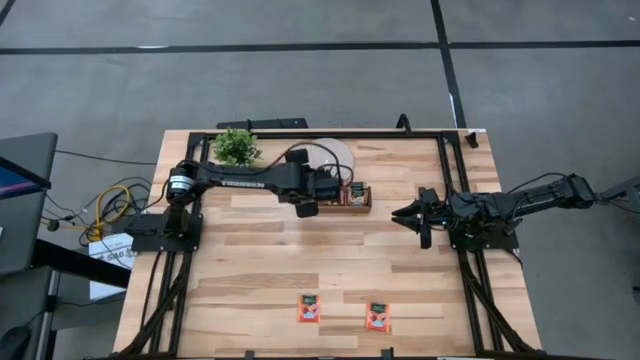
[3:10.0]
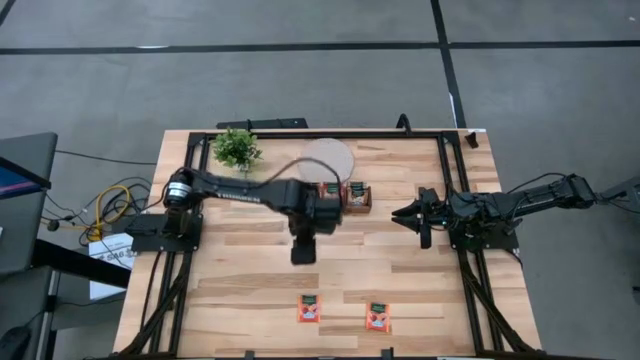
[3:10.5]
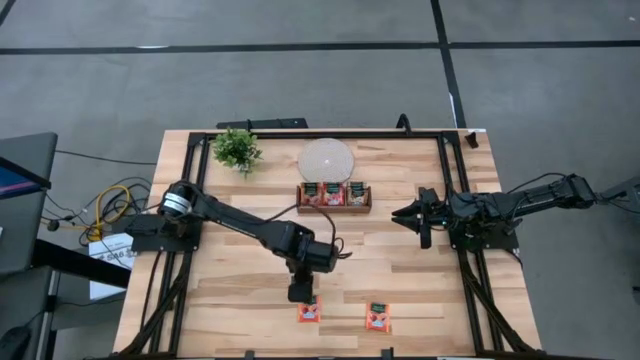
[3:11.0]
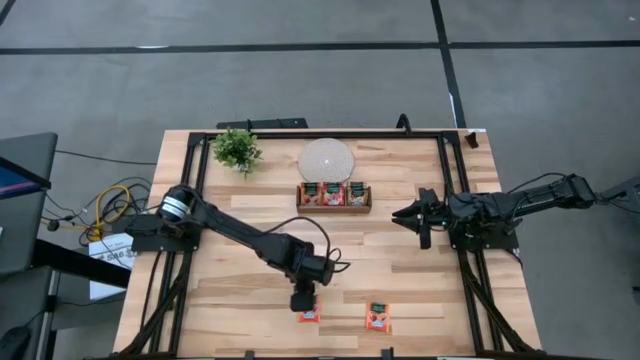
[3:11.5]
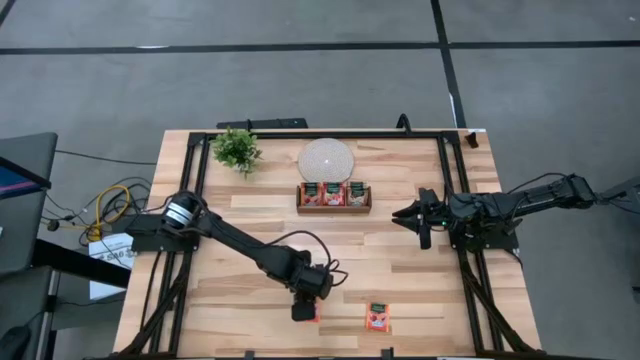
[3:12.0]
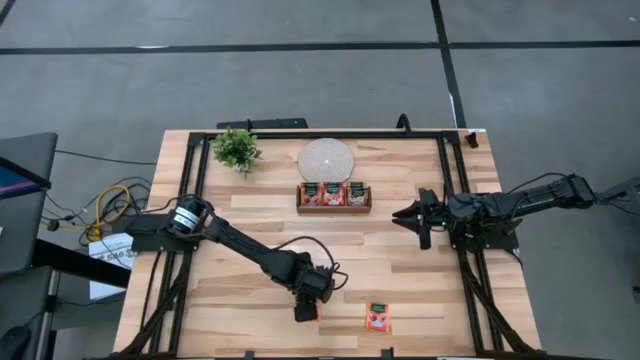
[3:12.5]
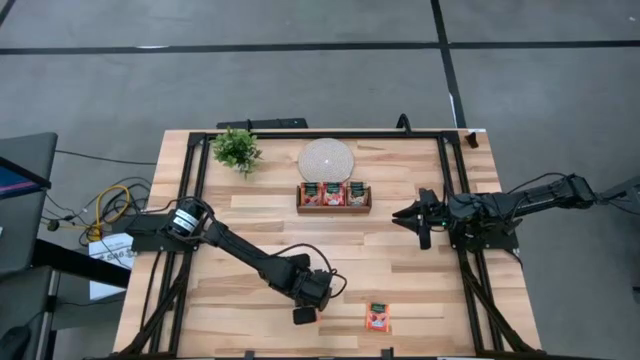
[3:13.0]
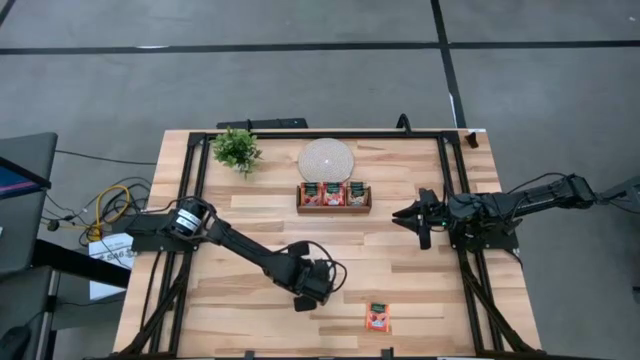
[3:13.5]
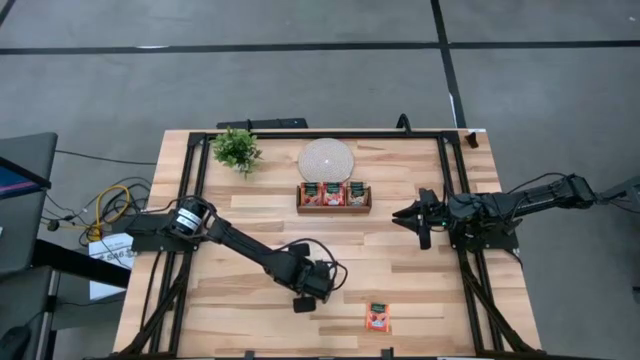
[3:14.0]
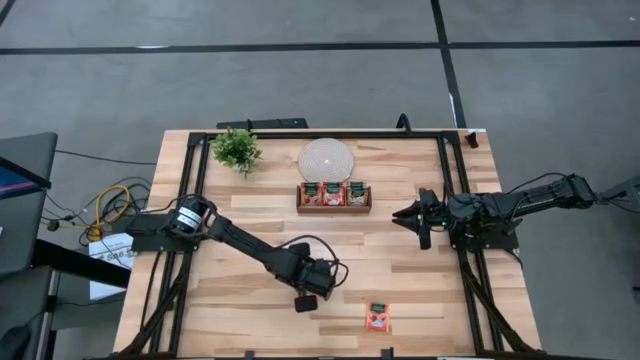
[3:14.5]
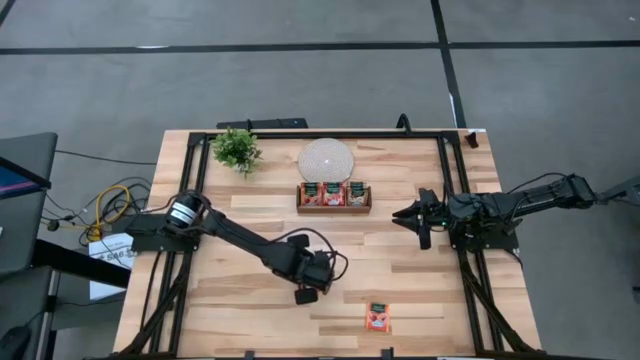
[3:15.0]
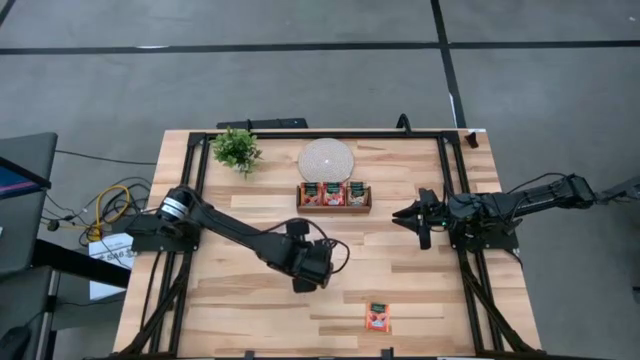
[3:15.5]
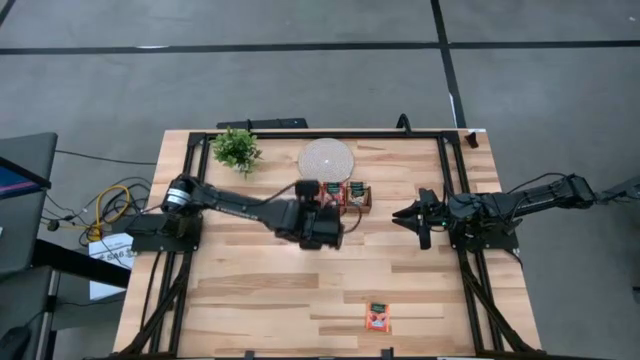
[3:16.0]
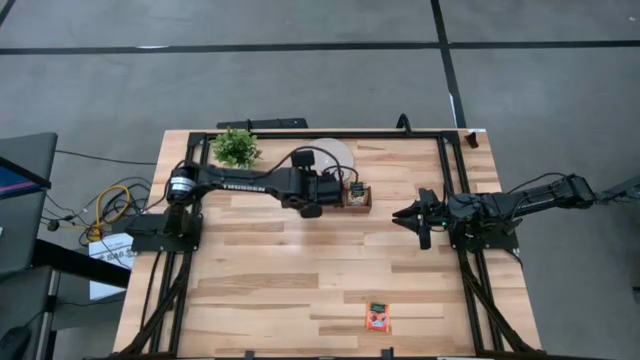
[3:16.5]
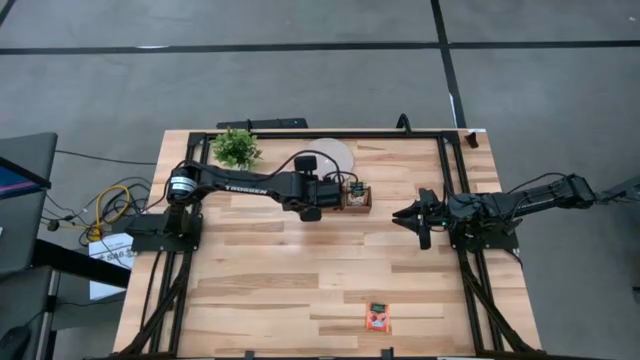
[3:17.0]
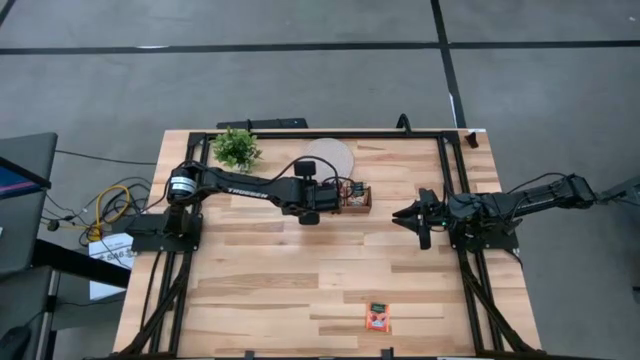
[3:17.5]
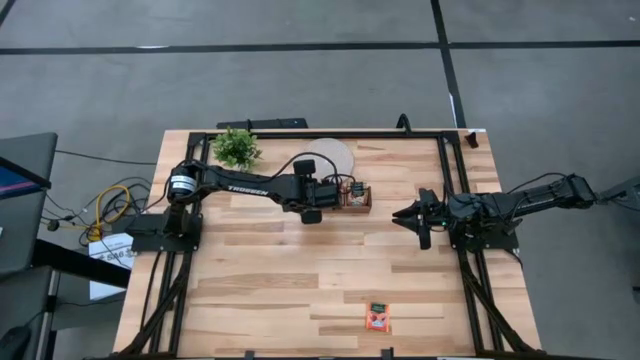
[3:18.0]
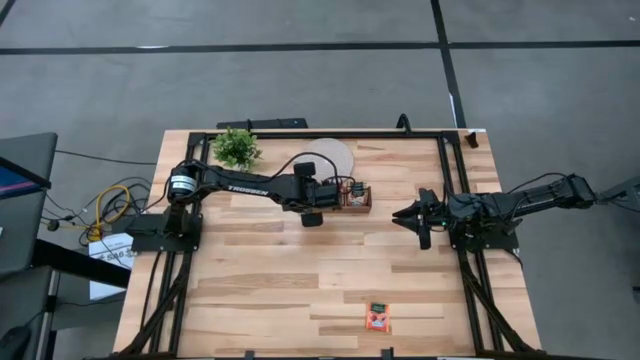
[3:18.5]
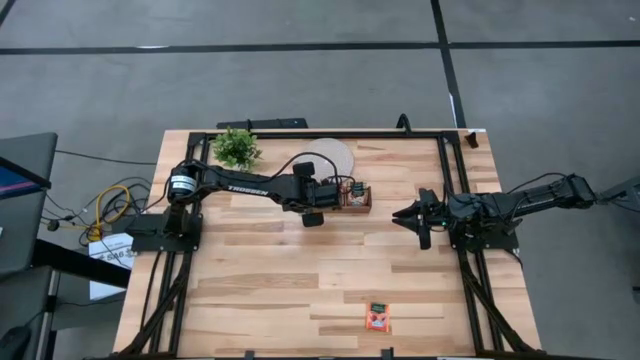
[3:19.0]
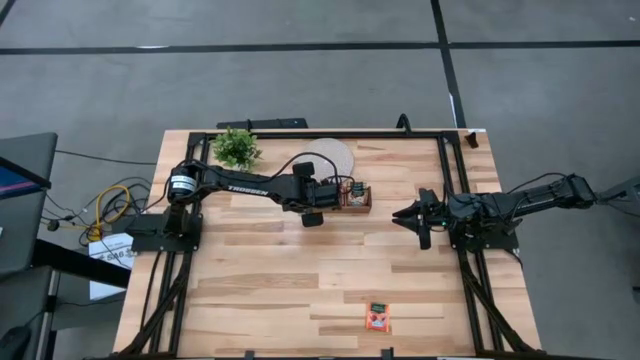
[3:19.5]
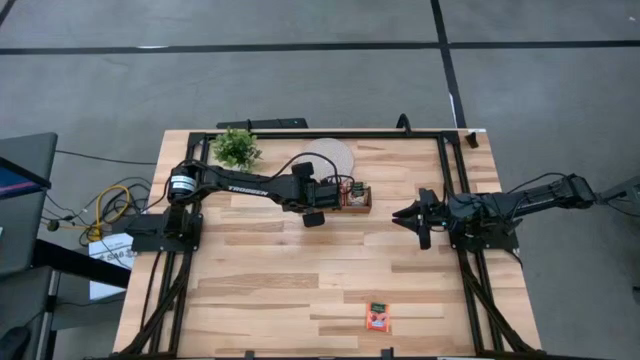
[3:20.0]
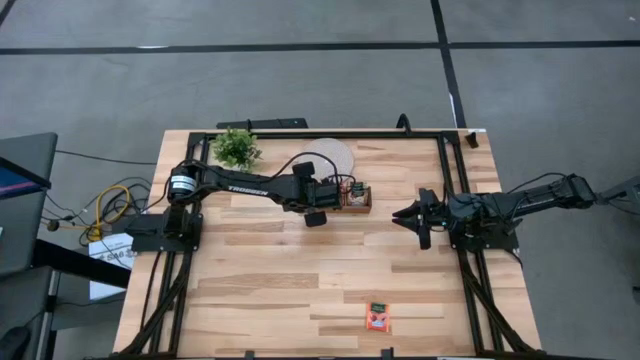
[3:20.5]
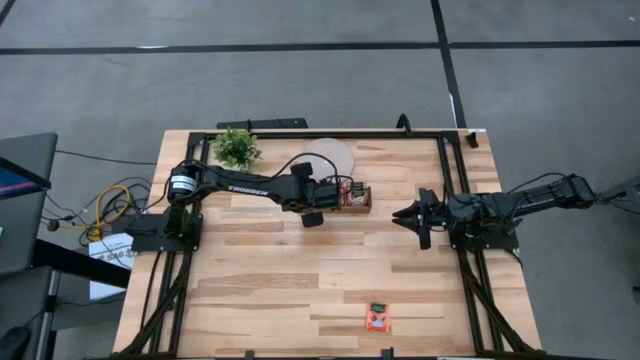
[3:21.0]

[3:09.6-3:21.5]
Task: Pick & Place Tea
Put the orange tea bag into the left section of the wooden organizer

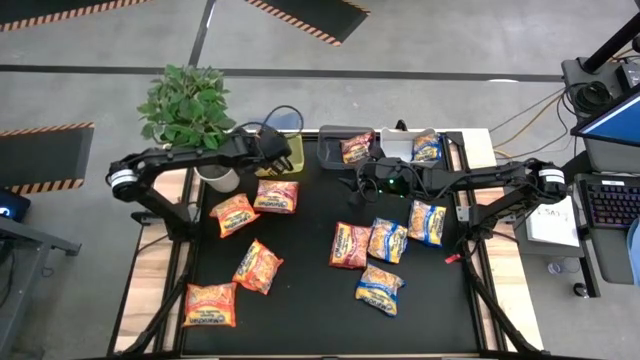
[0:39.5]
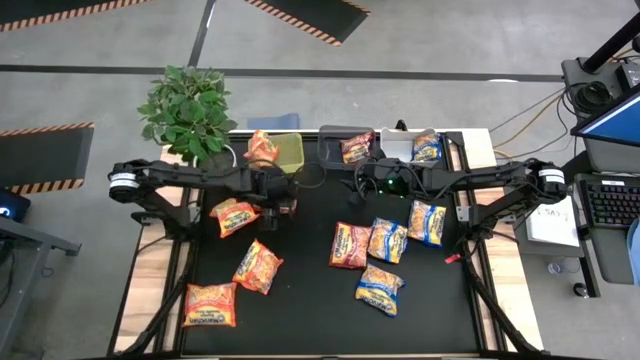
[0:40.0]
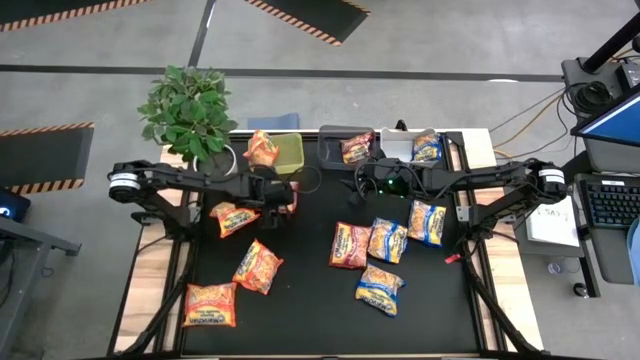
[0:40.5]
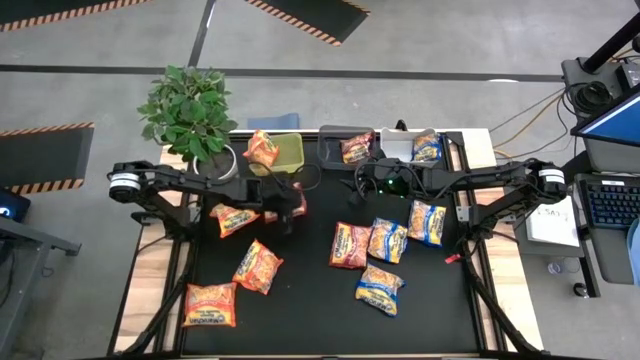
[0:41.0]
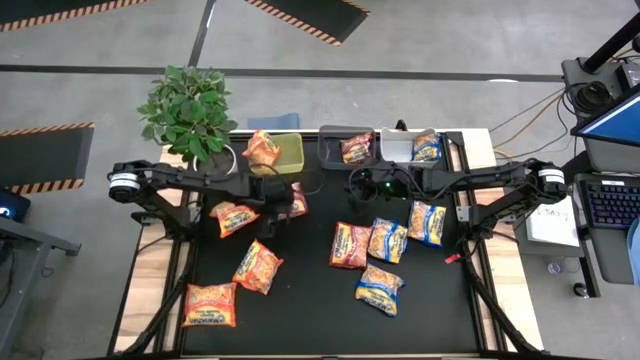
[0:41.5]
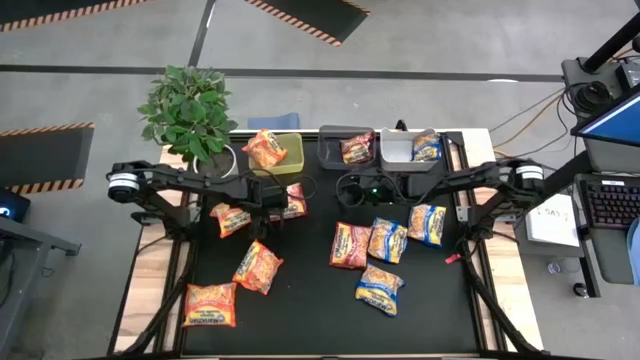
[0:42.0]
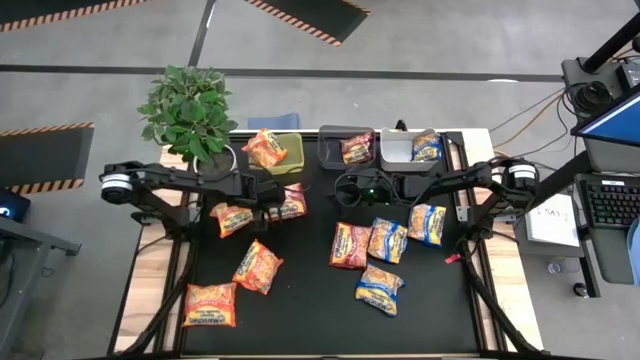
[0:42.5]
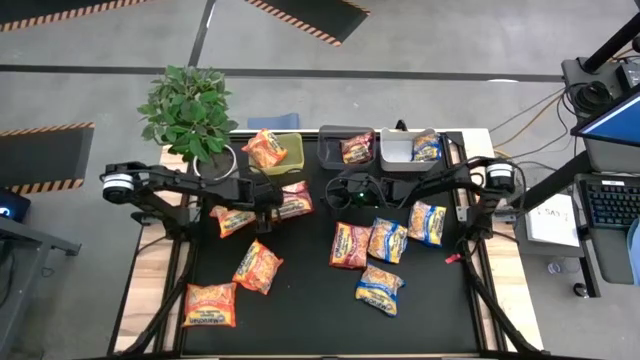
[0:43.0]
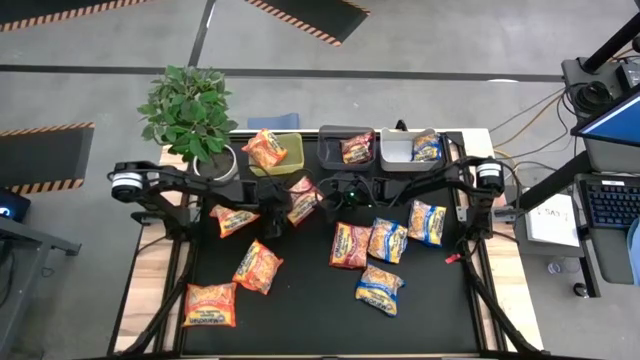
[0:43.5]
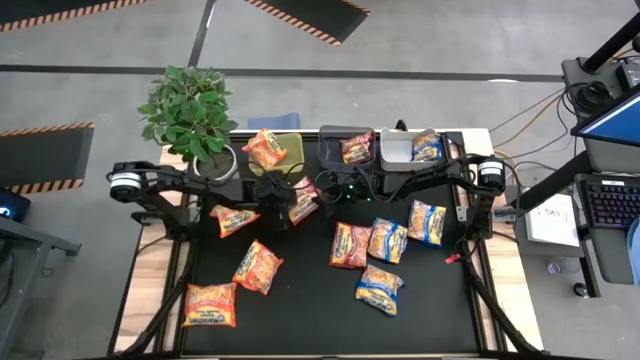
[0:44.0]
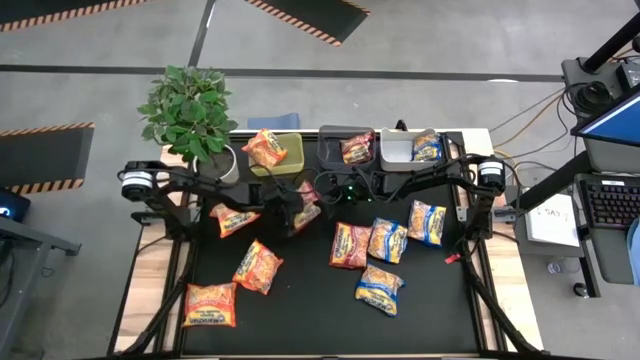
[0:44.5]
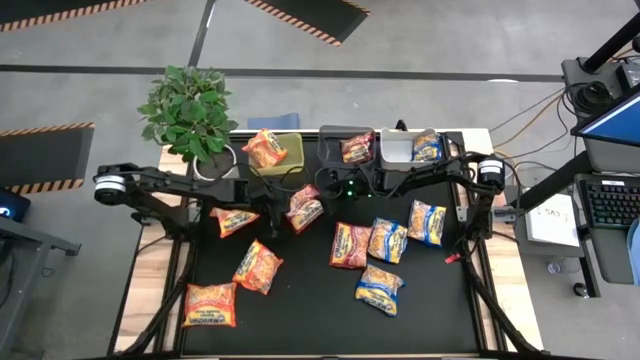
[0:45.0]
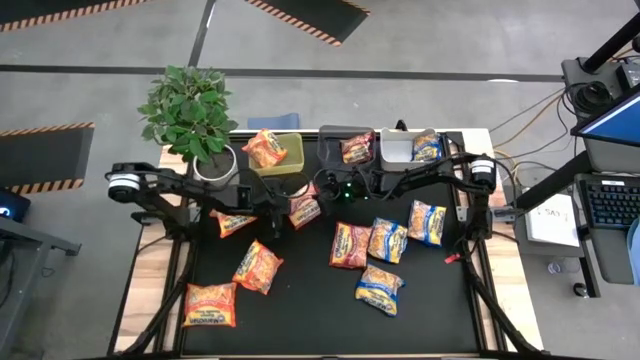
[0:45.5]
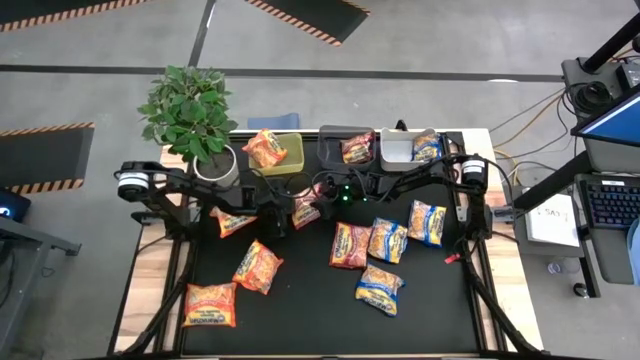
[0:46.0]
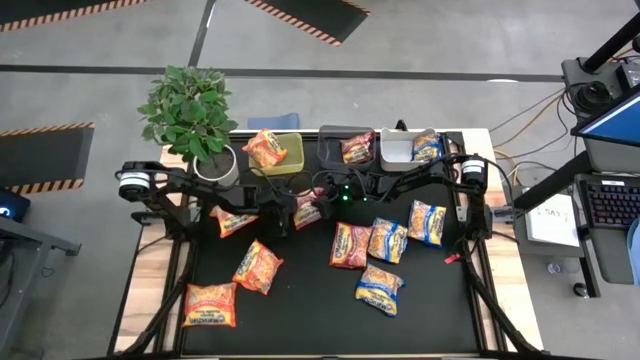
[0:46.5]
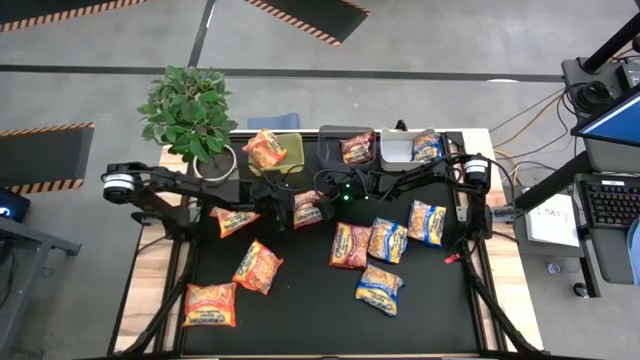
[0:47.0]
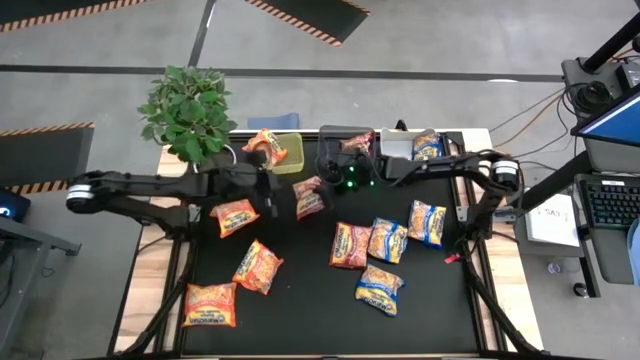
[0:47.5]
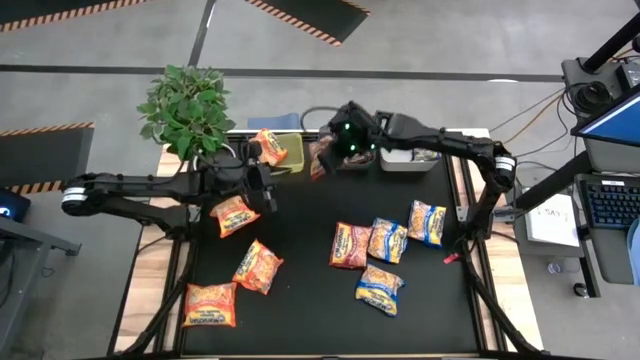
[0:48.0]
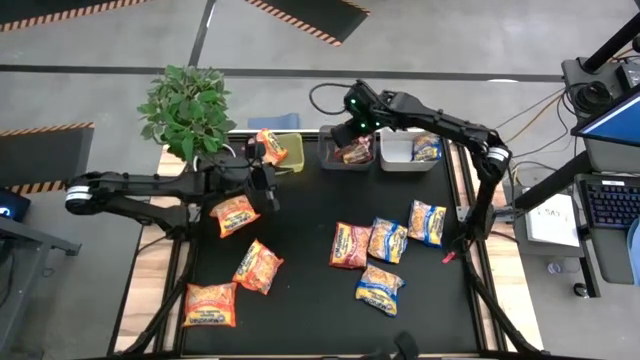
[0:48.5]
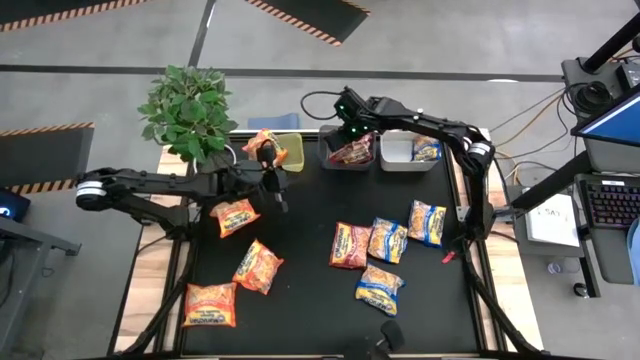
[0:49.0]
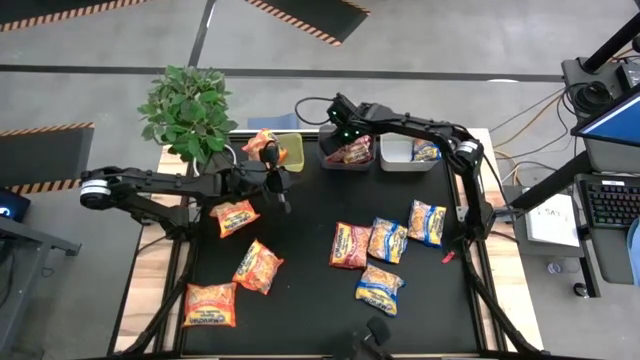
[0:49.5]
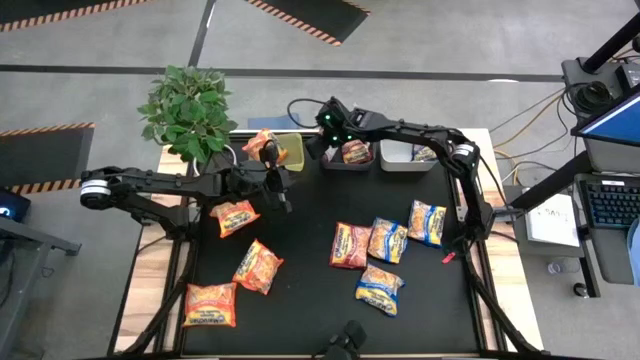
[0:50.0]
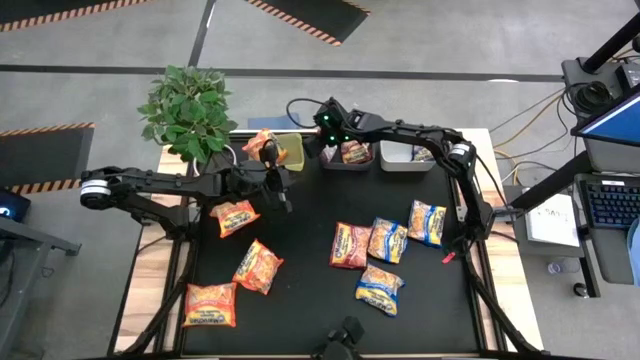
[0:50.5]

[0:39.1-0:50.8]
Task: Sort Maruchan noodles
Put the top red noodle pack into the black bin
